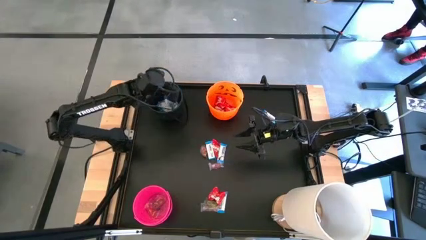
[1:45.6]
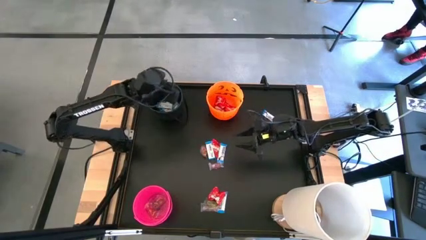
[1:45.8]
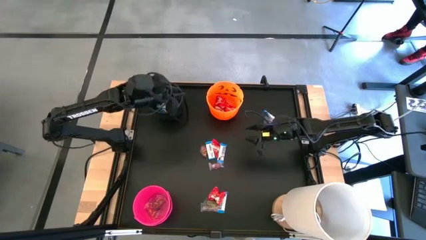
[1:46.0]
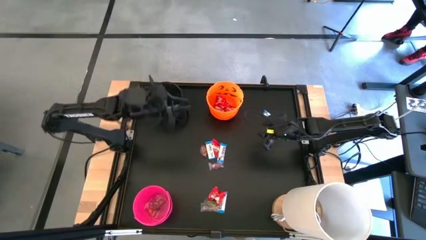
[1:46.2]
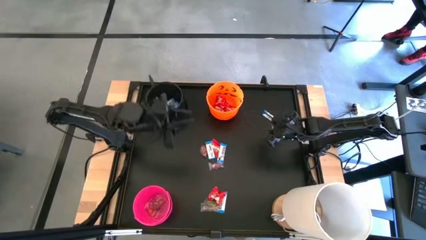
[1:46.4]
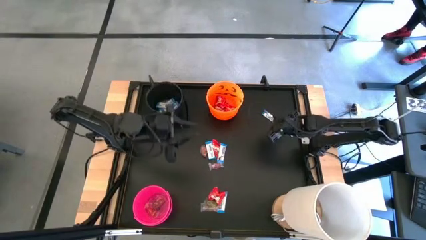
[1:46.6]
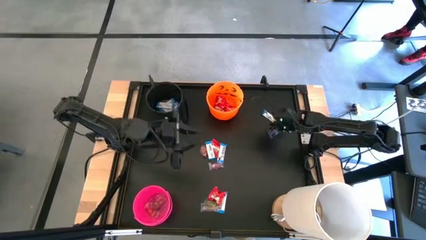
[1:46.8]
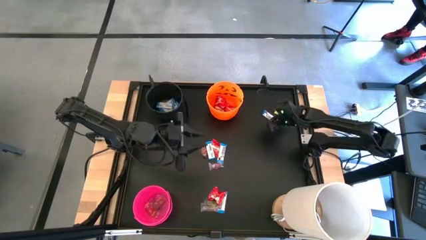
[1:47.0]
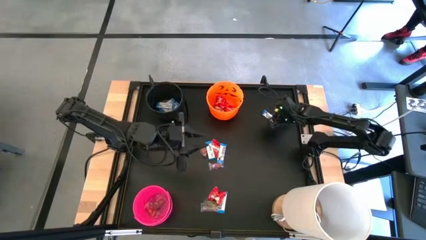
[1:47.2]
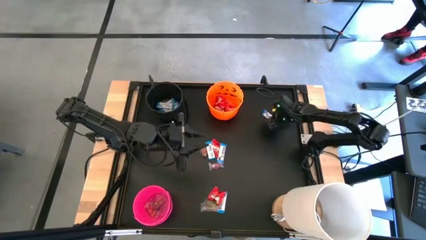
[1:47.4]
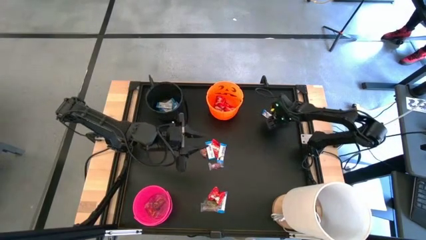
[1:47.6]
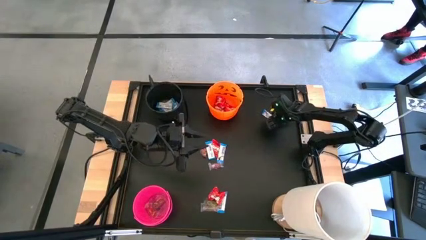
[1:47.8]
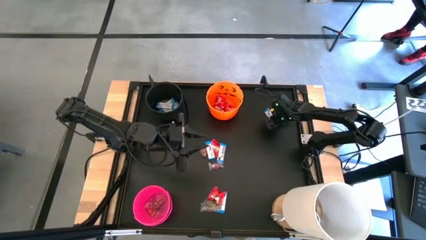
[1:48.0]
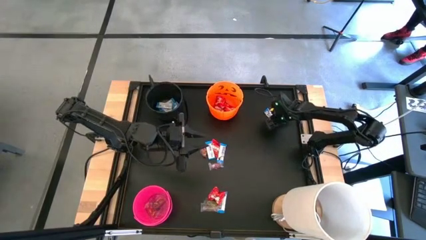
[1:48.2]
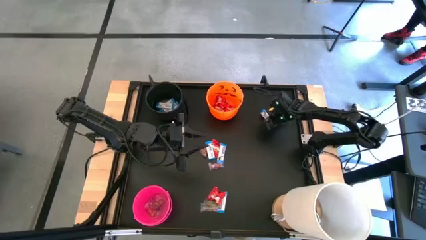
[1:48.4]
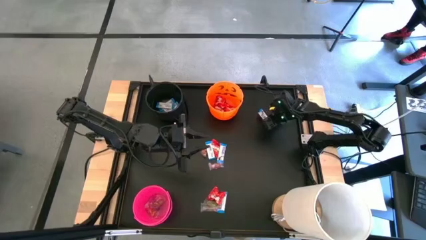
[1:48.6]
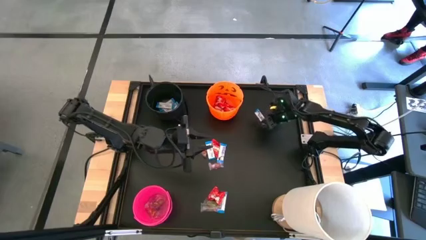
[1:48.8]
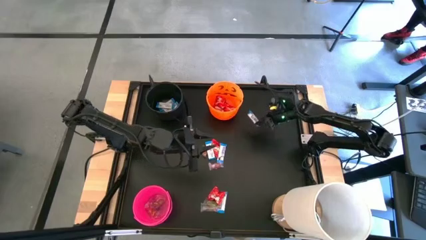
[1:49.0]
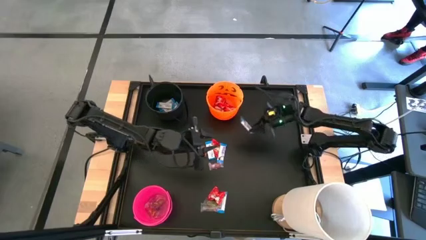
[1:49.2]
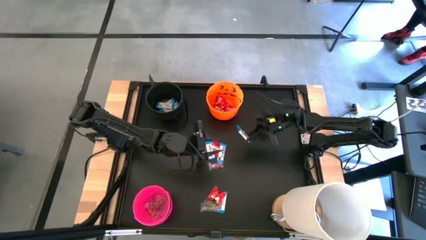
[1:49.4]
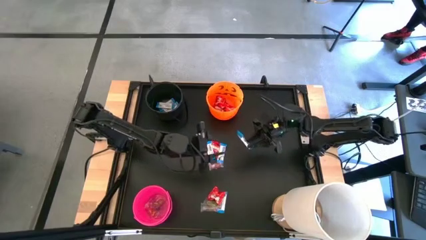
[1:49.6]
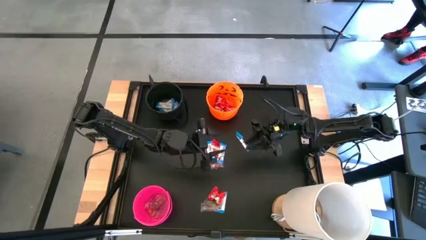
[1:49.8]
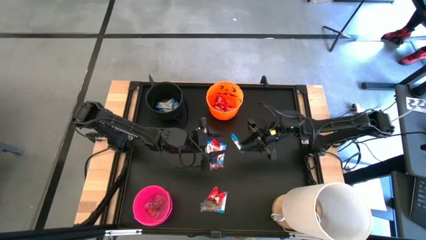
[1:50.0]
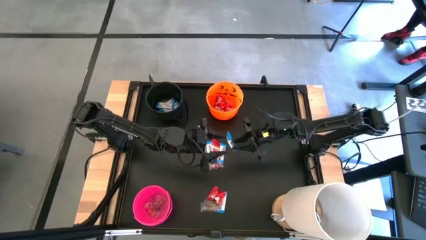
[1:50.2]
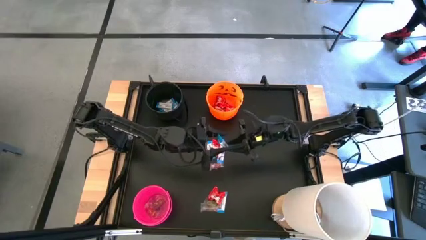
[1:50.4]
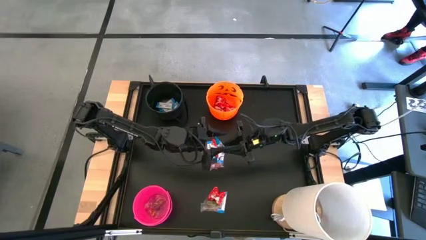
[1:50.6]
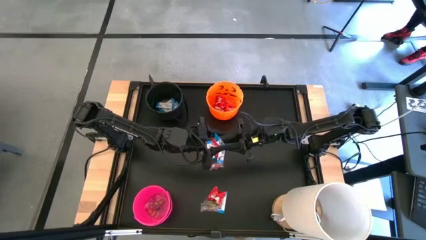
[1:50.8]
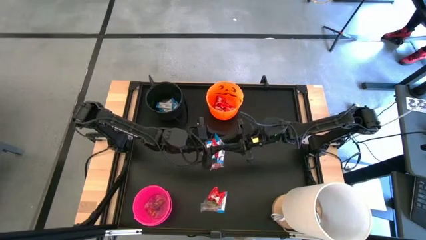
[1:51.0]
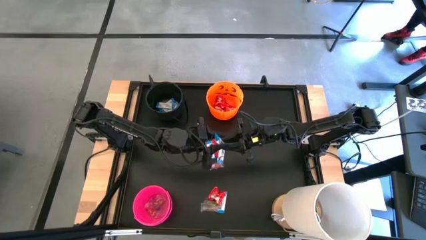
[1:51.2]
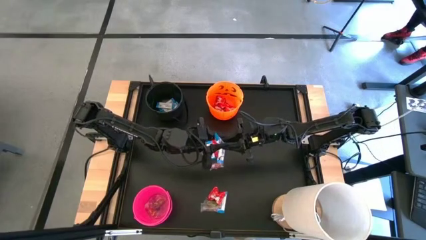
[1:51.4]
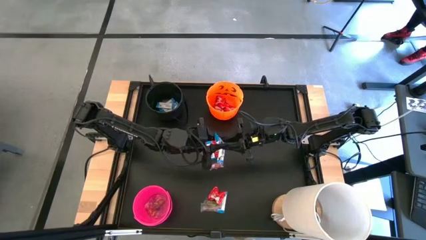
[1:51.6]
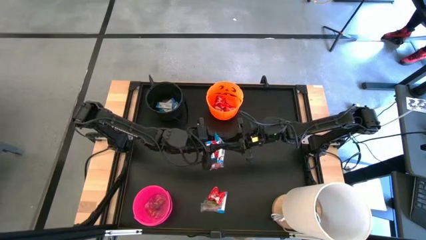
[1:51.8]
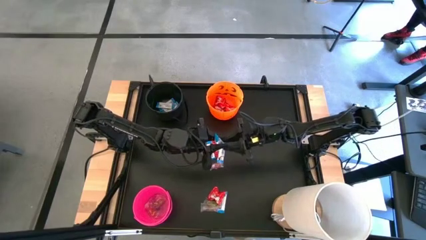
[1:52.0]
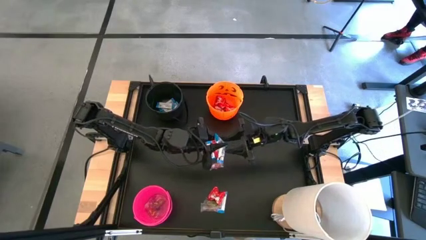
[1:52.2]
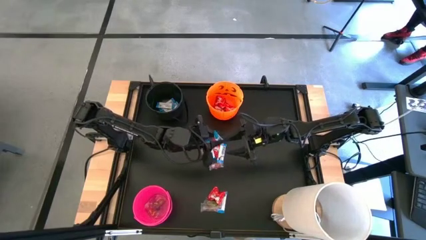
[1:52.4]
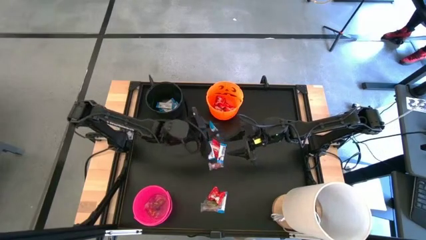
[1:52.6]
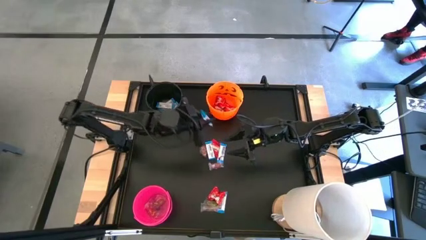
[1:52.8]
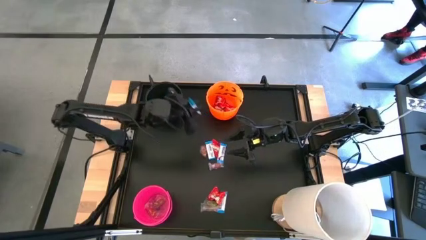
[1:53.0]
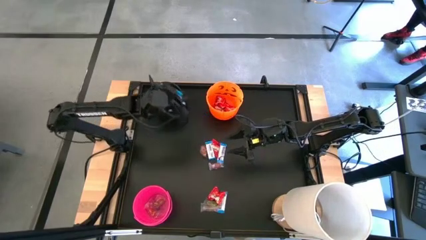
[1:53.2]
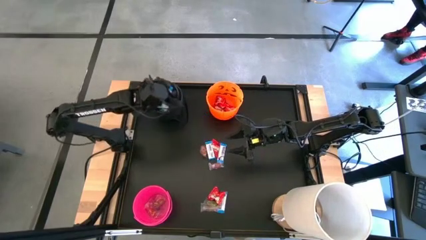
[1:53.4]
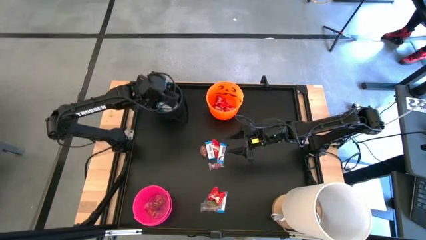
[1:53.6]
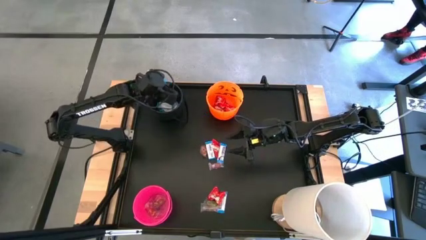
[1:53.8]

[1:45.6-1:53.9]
Task: Sort candy
Put the top right white candy into the black bin

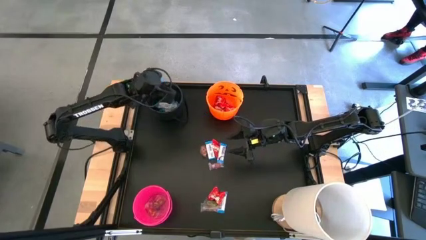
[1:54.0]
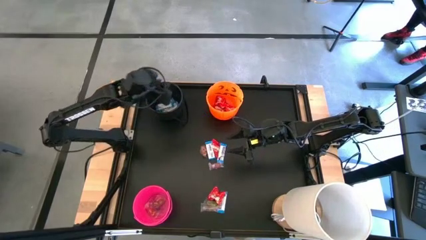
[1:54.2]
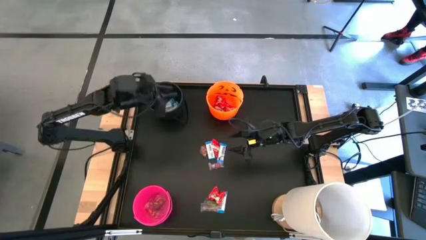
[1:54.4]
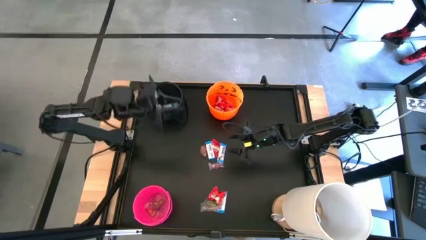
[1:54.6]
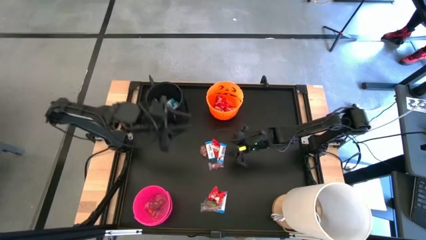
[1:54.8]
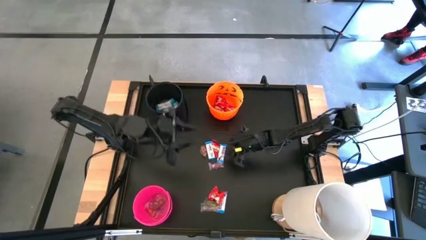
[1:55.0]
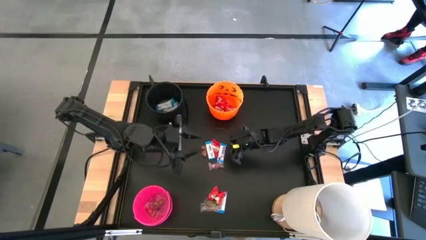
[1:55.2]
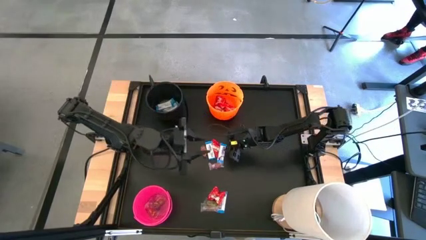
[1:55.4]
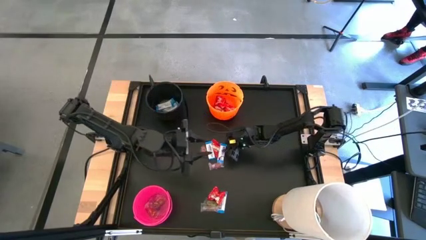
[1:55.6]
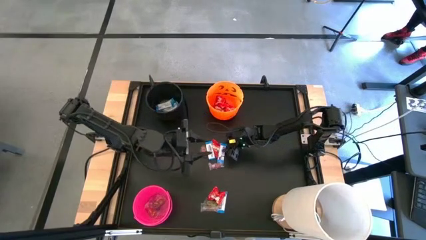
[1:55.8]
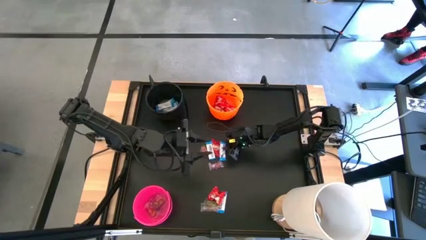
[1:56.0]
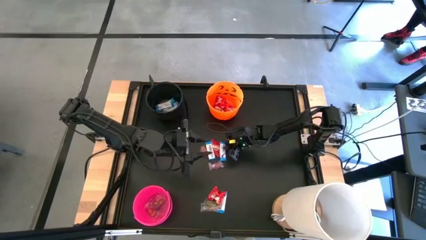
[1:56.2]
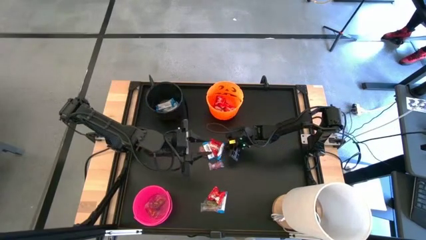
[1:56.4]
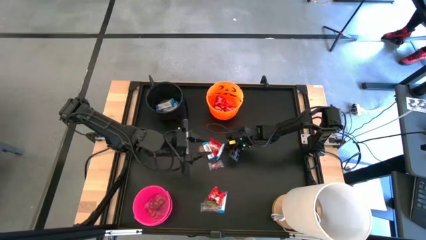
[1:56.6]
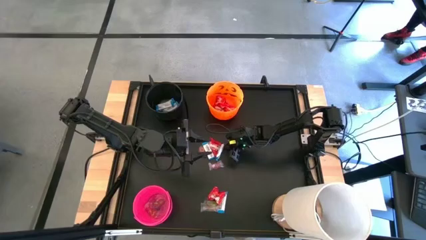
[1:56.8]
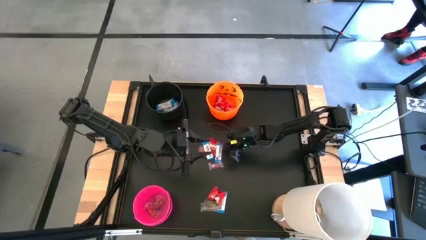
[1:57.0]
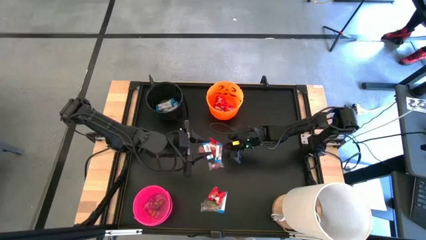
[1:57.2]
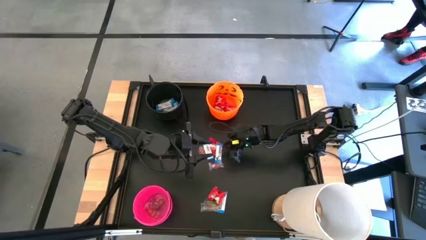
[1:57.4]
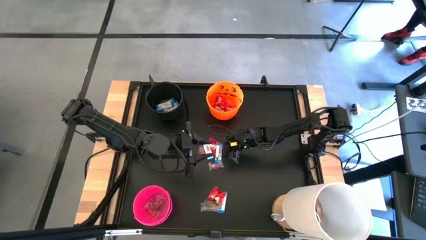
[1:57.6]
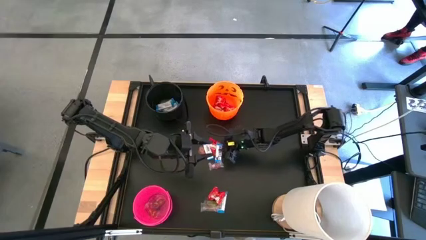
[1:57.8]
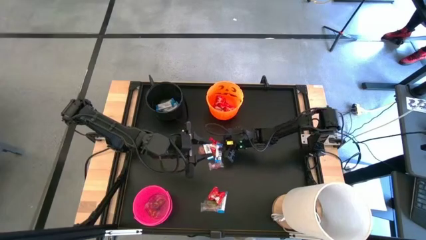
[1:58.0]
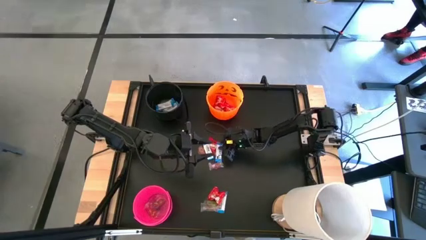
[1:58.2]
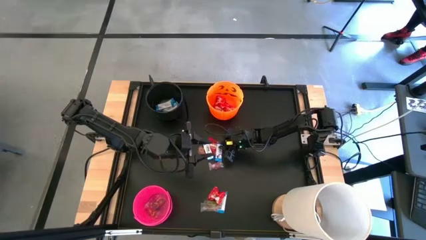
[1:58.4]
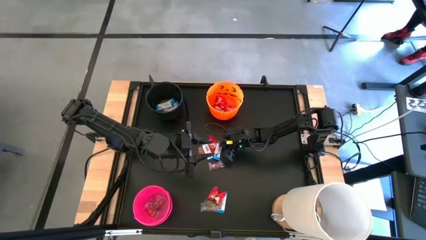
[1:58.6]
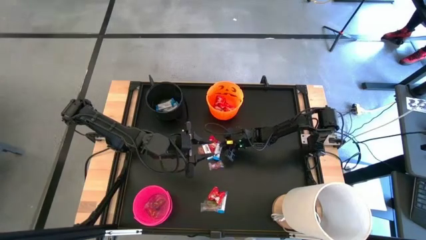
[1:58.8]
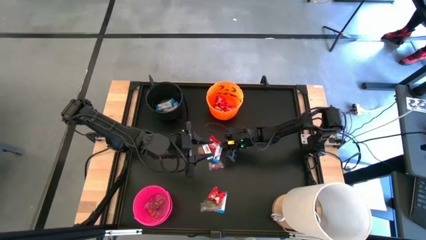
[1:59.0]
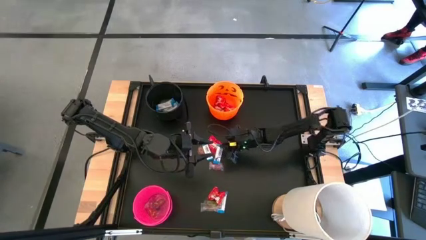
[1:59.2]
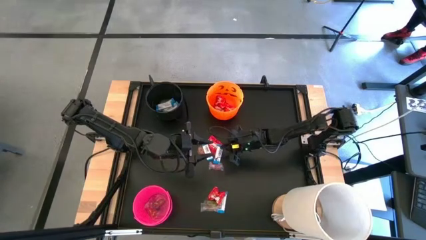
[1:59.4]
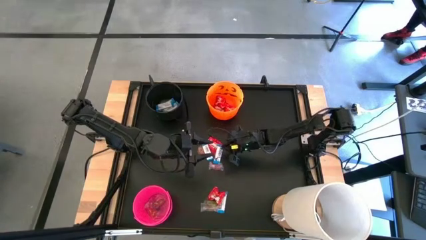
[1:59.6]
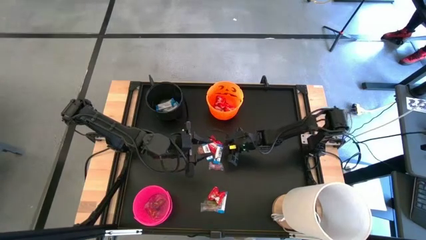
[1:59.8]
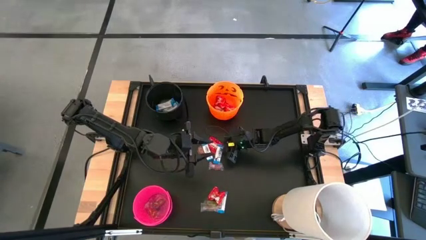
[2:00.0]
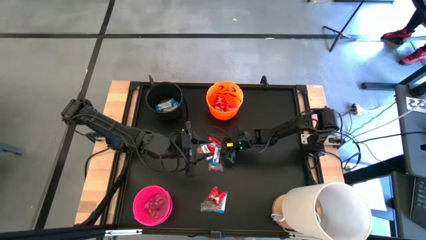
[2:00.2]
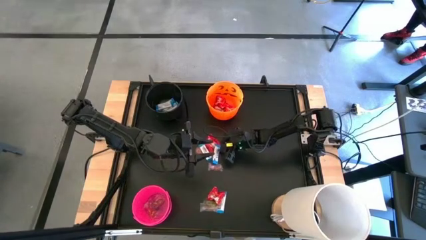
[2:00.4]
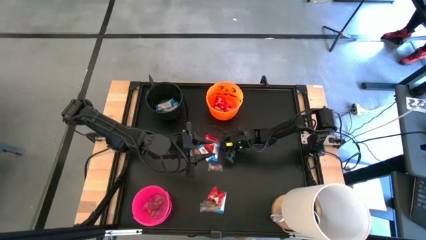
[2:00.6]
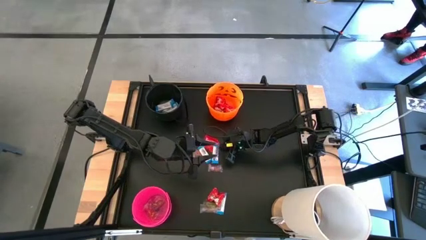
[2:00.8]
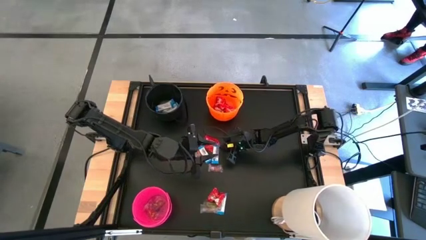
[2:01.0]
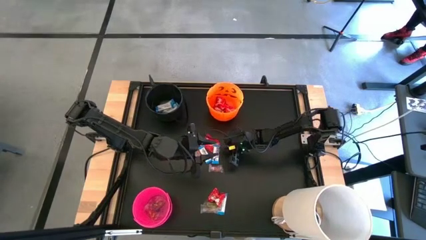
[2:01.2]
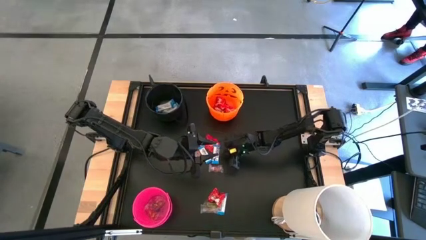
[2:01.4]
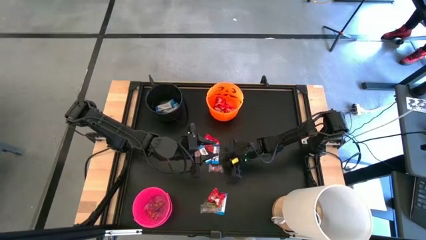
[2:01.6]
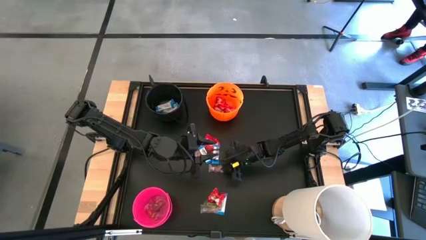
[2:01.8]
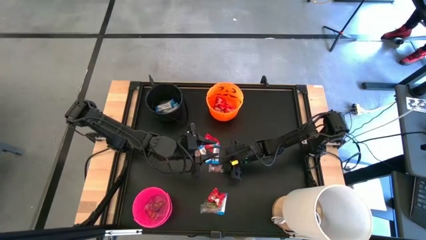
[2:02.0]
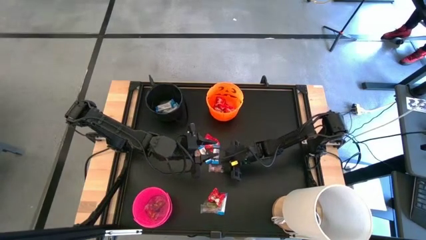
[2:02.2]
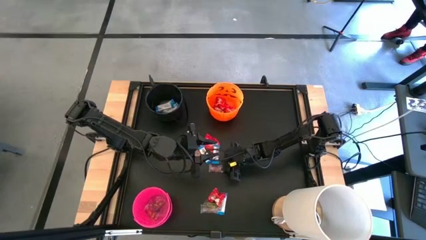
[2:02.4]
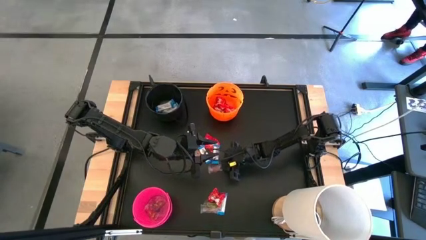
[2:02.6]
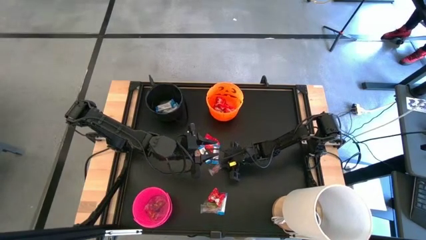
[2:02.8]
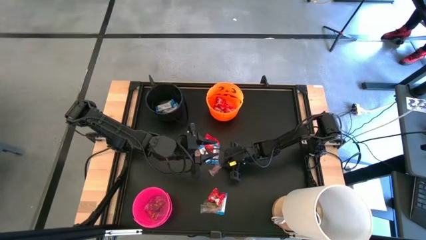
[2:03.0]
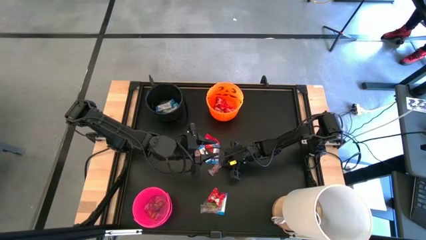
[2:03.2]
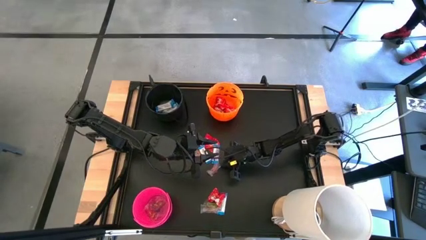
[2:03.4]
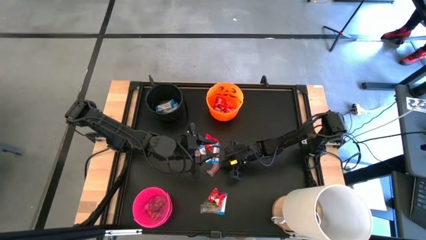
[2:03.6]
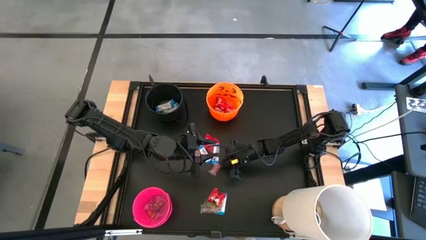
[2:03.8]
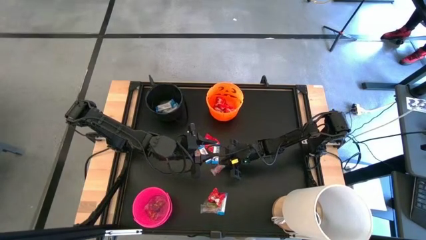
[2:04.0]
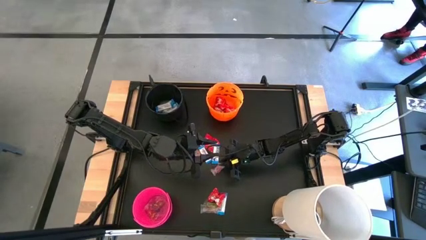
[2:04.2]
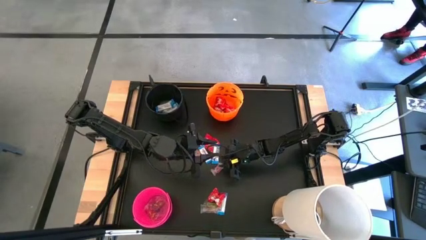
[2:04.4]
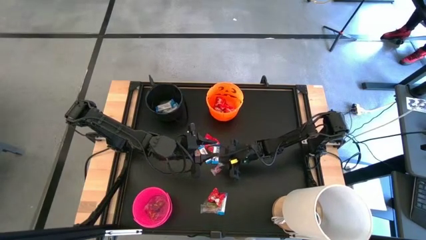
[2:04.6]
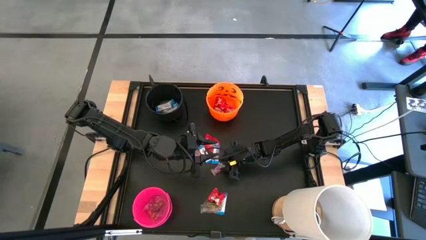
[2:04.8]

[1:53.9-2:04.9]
Put the top transparent candy into the black bin
